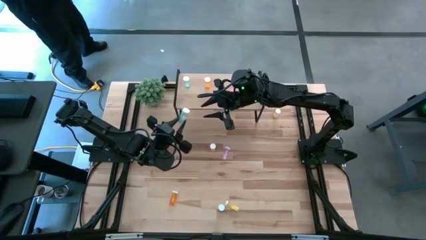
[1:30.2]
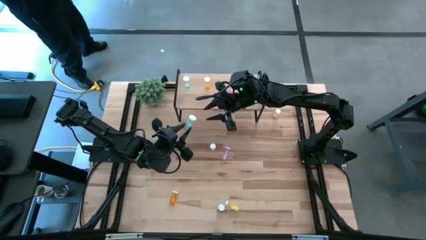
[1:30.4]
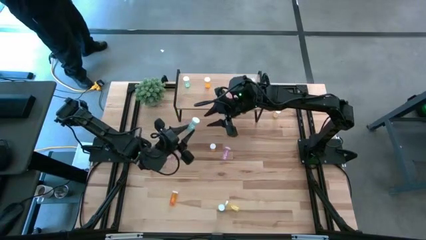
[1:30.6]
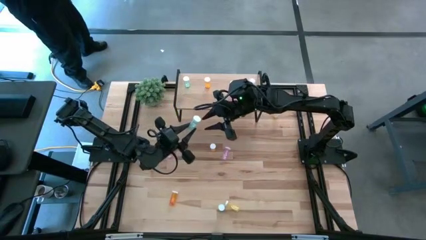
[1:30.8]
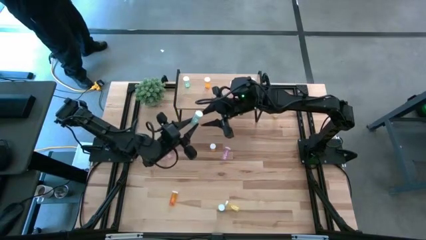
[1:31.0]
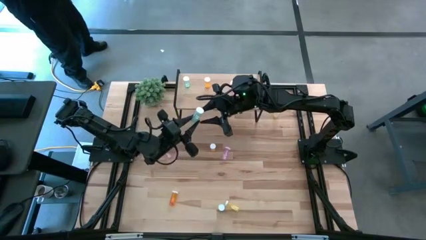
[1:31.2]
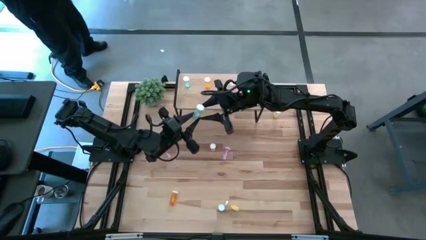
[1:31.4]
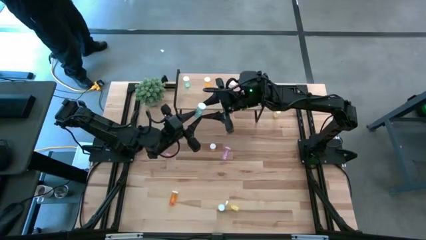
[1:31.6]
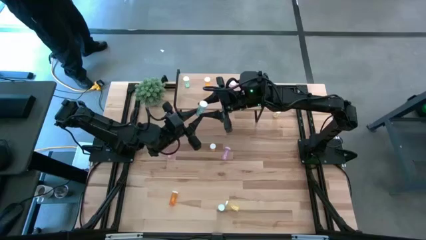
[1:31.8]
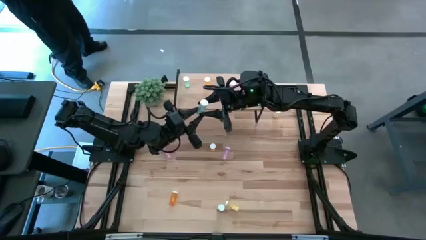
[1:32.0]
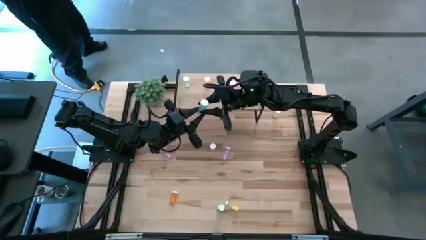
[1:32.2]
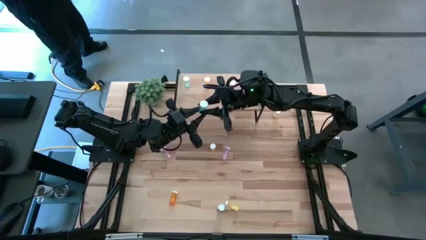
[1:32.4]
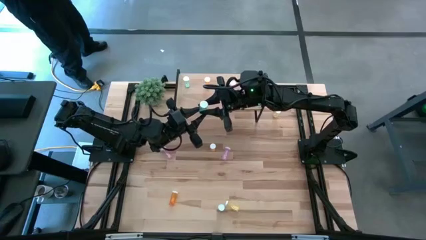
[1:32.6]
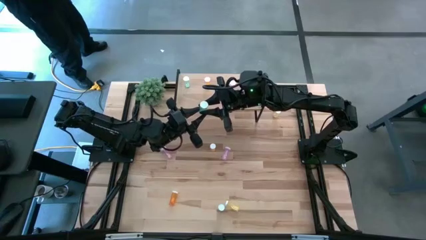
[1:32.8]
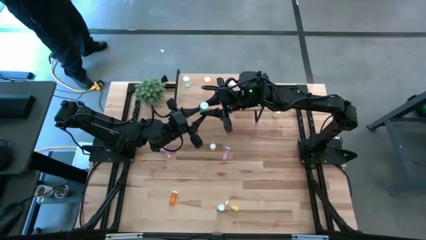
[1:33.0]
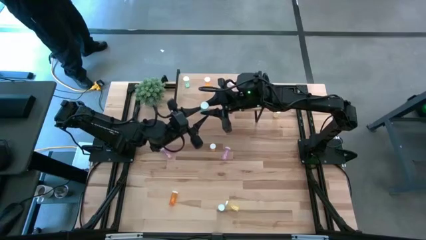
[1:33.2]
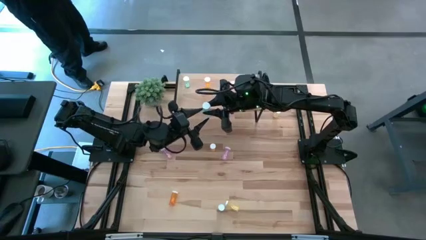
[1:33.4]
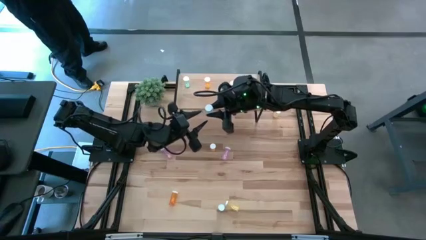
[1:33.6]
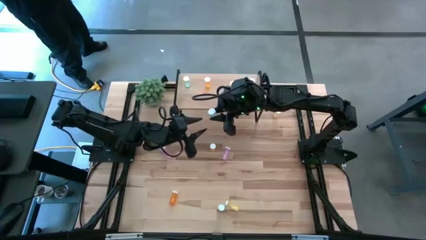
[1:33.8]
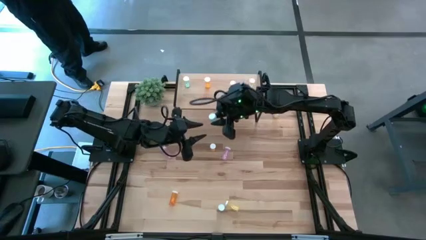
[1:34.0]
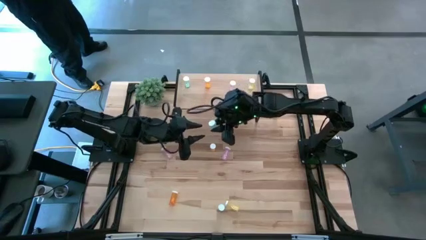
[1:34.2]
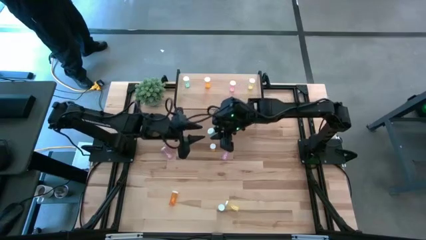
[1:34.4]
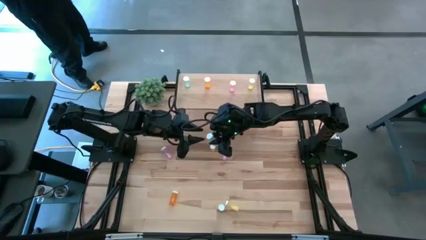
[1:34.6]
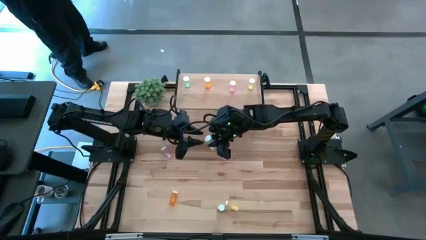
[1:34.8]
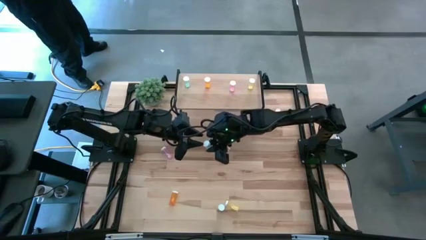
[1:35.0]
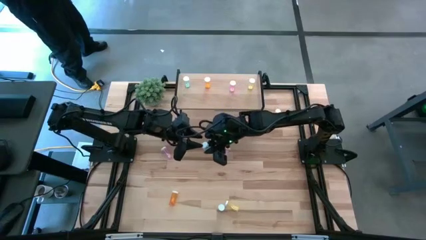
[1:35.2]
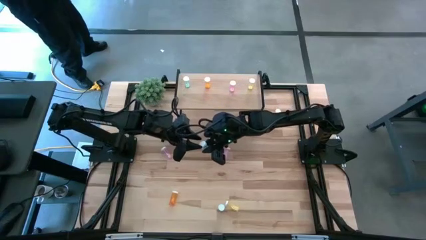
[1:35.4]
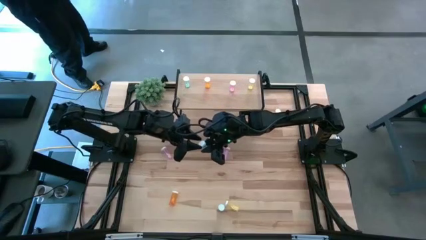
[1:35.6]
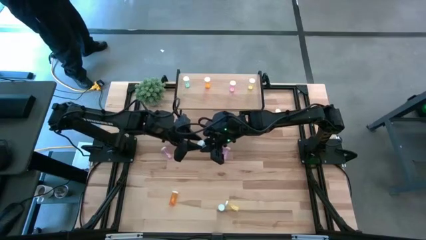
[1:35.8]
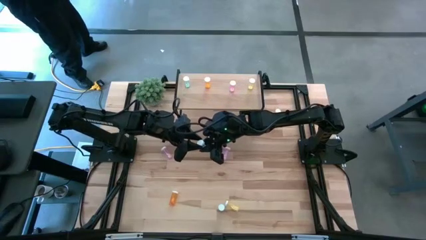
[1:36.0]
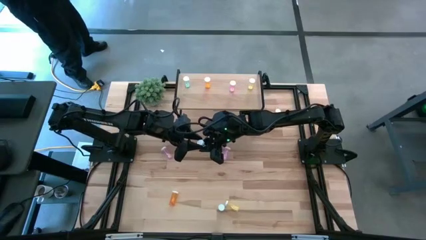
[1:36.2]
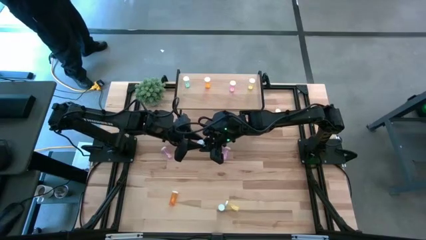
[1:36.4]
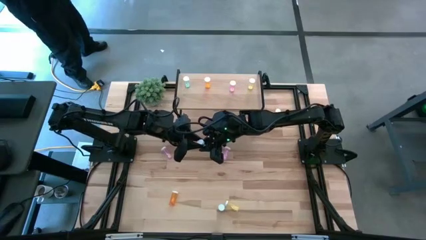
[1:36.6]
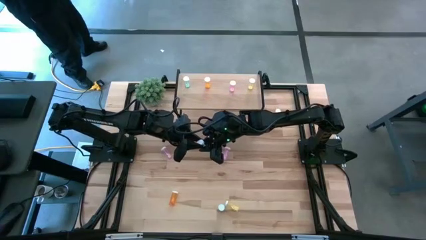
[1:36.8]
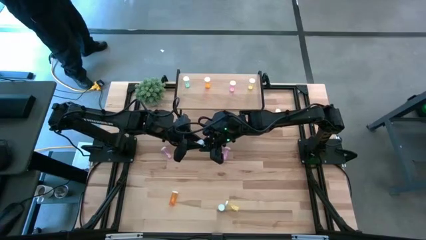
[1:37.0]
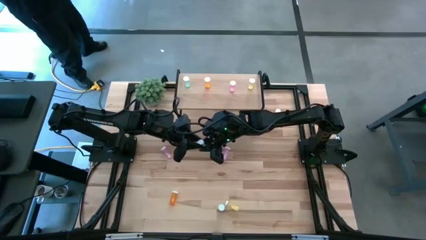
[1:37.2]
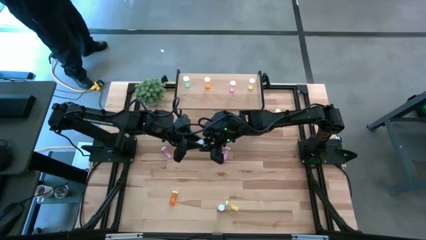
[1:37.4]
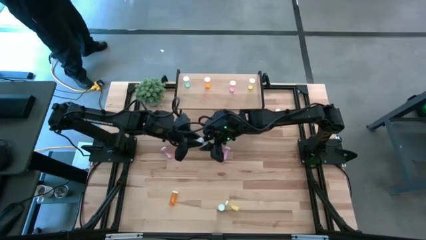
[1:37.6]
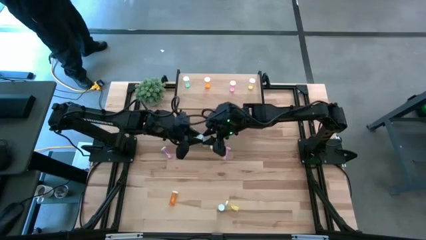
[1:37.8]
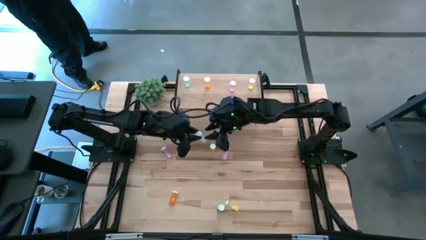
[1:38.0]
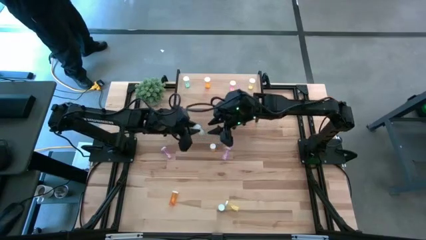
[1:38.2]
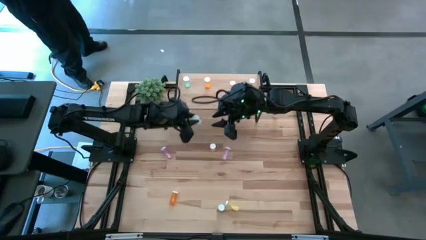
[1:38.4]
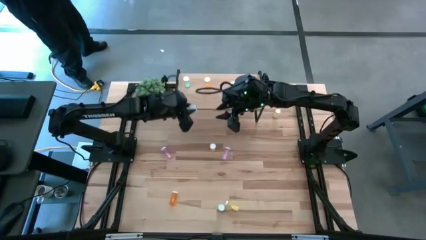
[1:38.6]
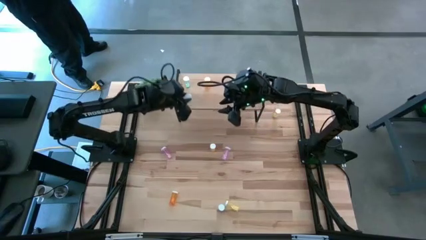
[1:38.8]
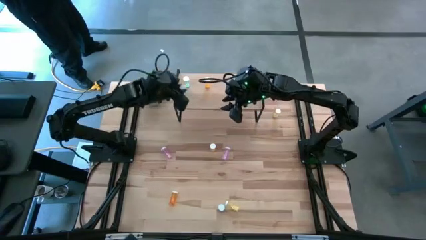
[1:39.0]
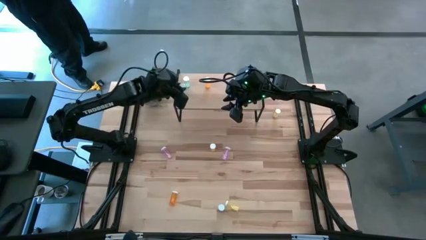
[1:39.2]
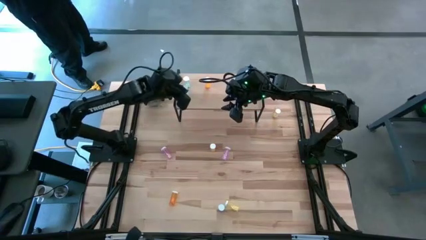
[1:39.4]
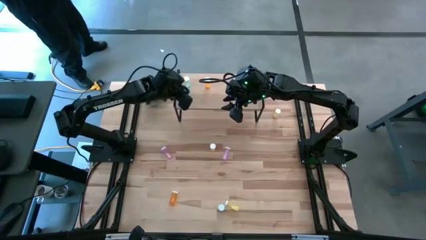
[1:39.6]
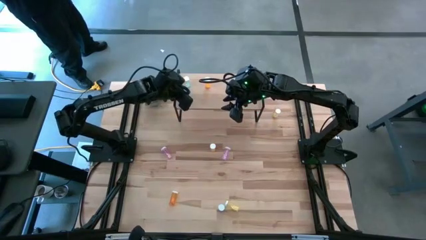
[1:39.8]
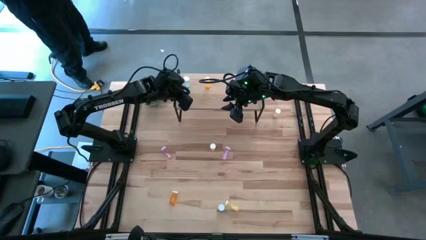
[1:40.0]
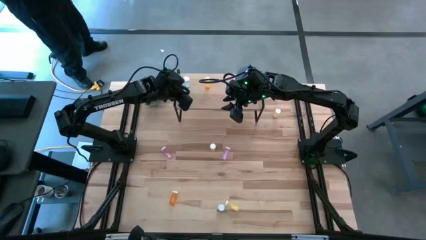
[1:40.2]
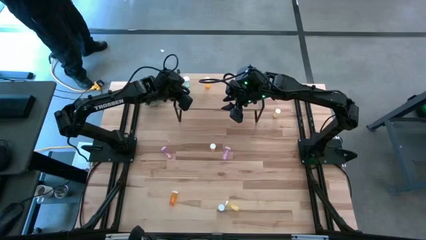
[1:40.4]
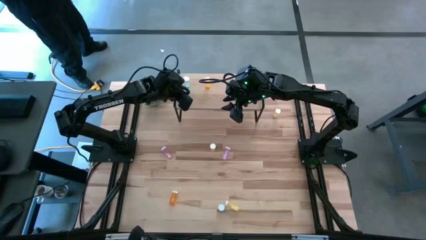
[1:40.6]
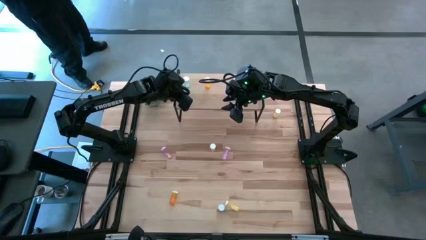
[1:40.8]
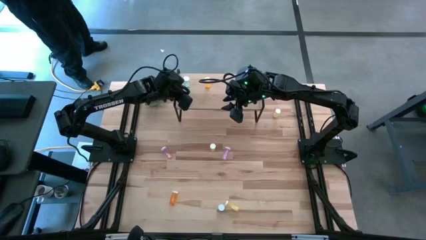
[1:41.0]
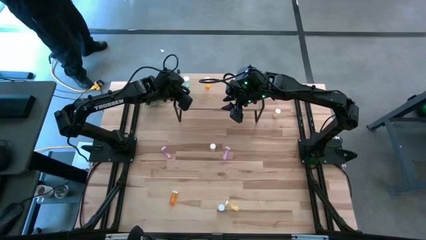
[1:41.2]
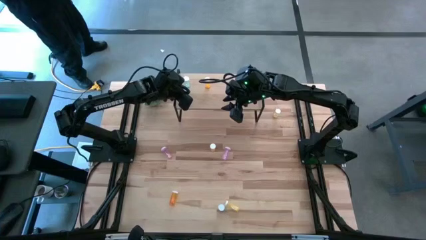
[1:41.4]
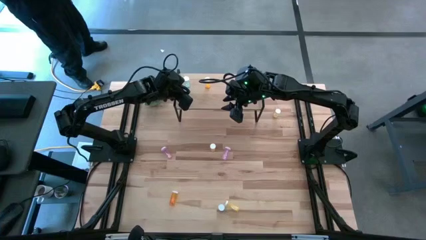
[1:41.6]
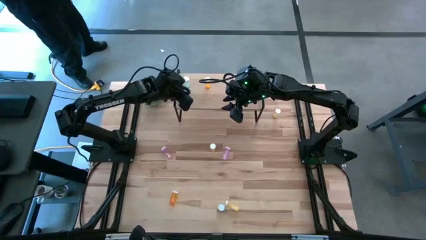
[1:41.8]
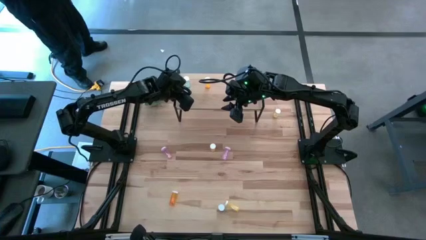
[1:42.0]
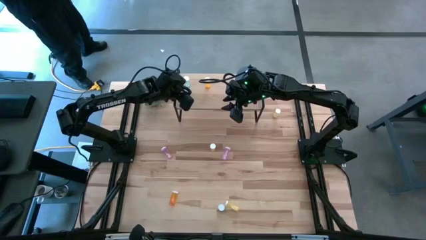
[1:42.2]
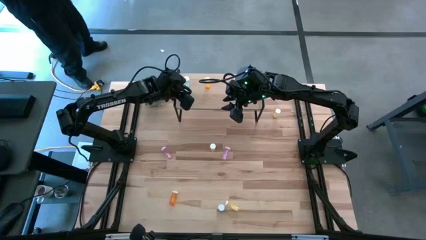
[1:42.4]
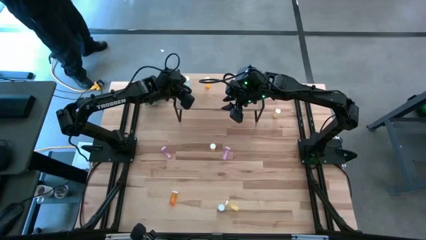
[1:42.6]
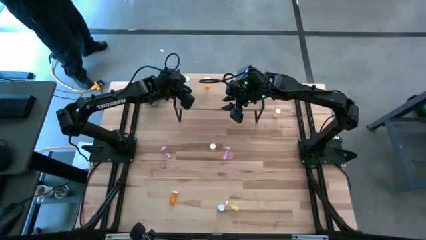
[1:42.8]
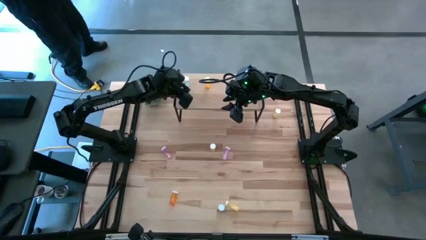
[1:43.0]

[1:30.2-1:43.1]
Task: Pick and place medicine bottles onto shelf by color
Put the top blue pill bottle on the shelf aligned with the blue pill bottle

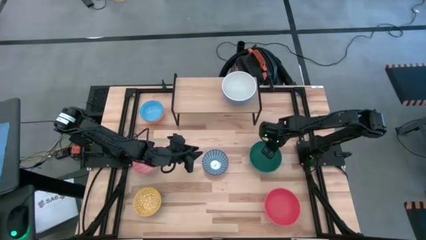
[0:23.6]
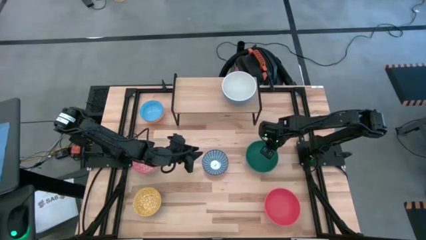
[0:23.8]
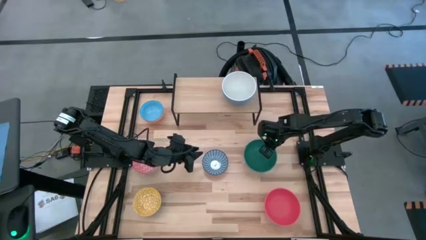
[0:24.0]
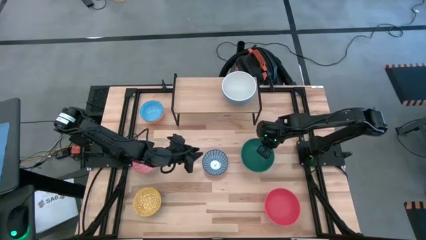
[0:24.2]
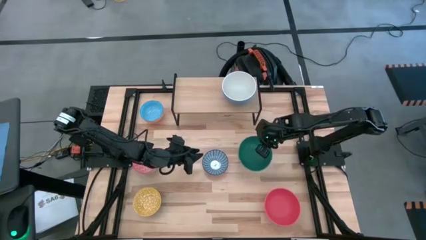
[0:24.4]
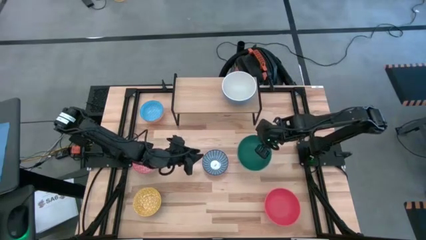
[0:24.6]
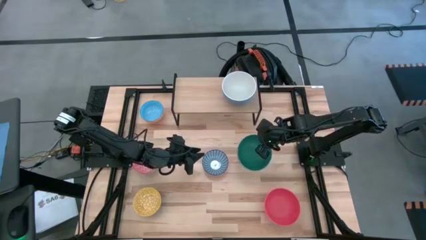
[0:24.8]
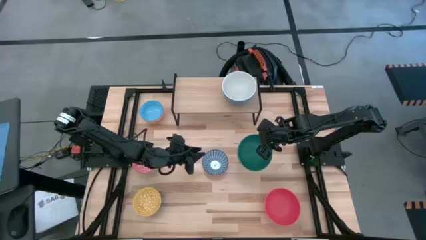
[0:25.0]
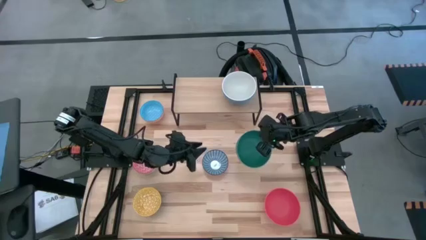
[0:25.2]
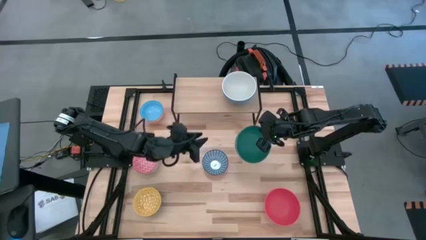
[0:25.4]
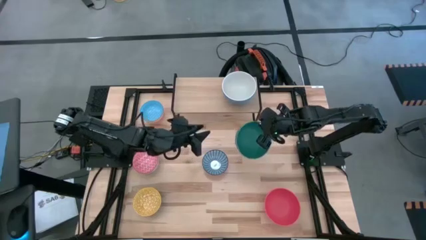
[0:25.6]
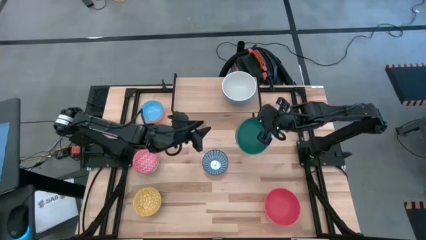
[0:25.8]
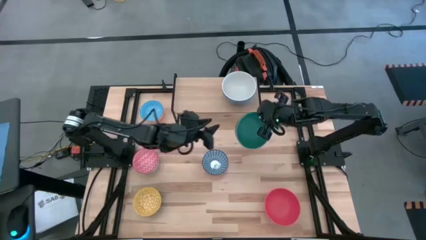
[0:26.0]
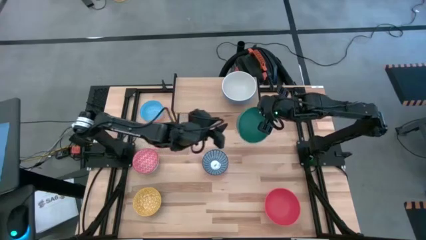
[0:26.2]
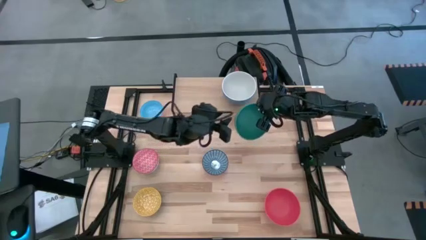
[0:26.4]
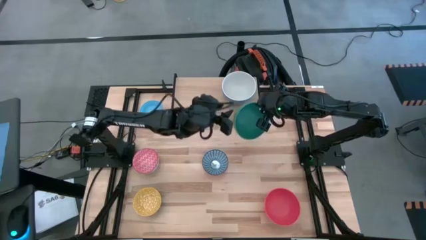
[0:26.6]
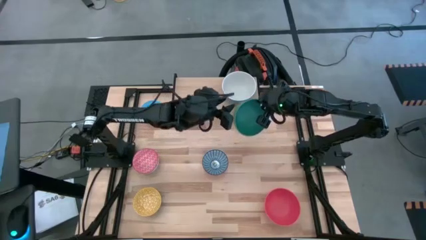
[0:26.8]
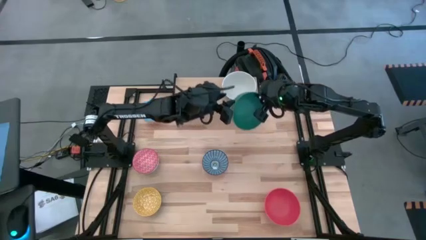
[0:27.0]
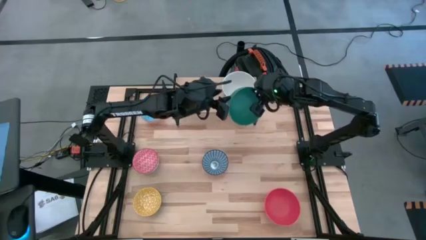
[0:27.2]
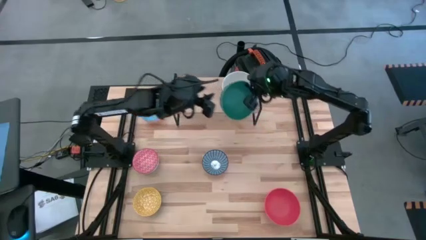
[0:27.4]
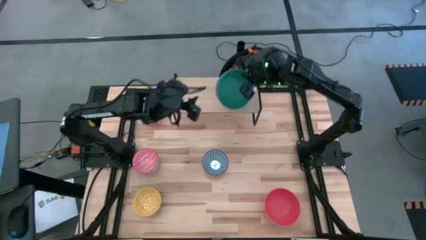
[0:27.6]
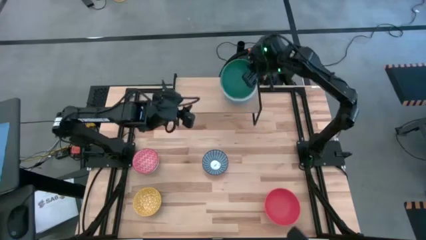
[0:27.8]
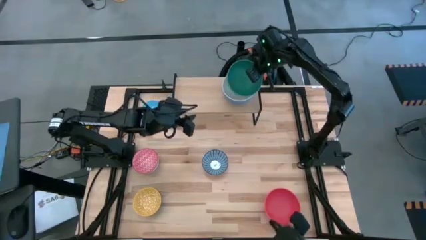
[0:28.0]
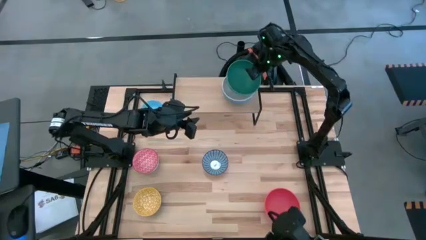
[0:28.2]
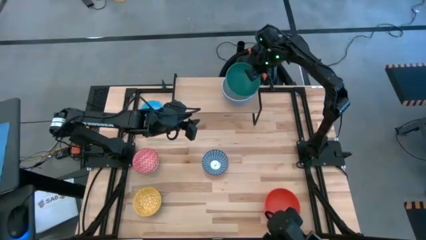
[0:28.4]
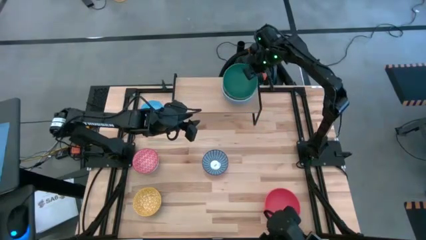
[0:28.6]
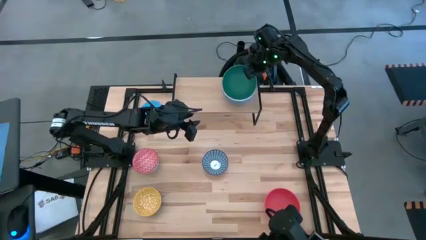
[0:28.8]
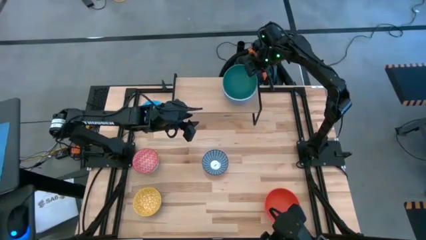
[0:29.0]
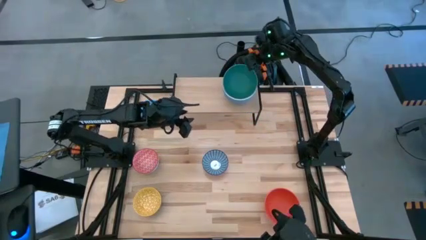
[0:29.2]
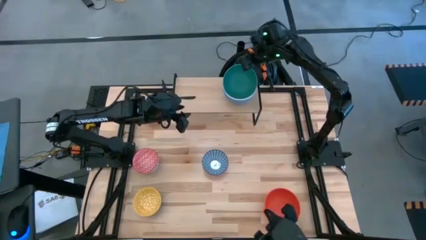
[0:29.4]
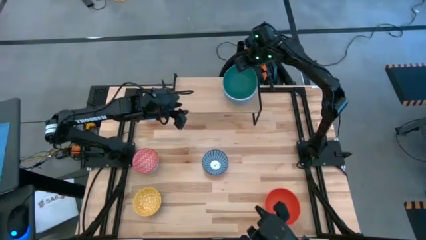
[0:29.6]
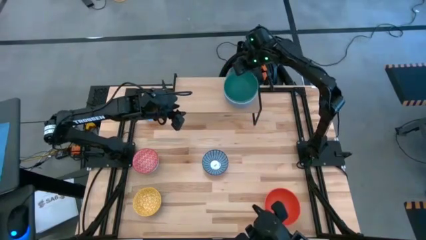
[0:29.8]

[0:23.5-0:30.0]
Task: Place and stack bowls onto a shelf
Stack the green bowl on top of the white bowl on the shelf
